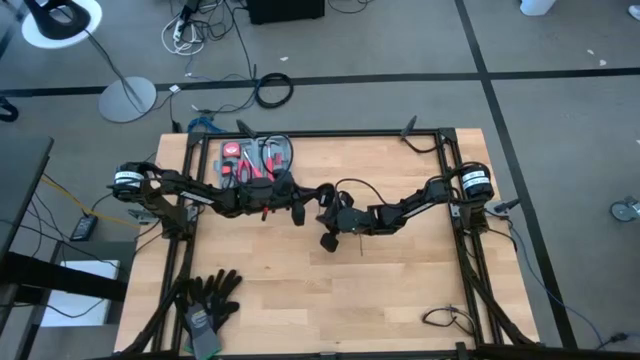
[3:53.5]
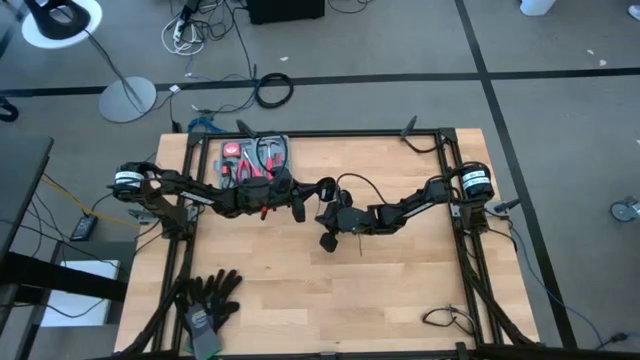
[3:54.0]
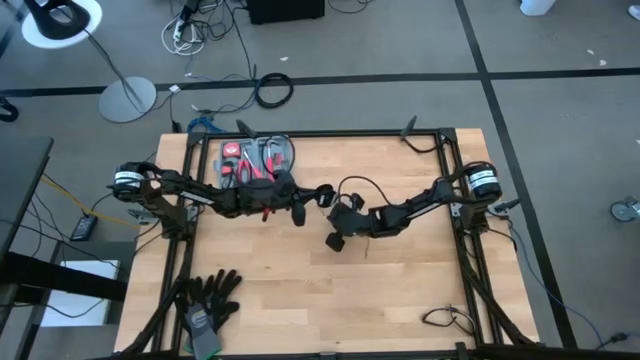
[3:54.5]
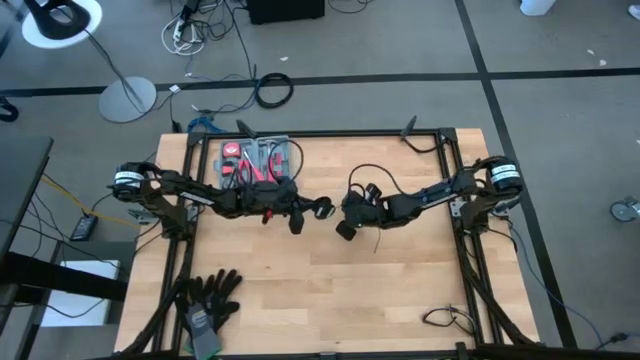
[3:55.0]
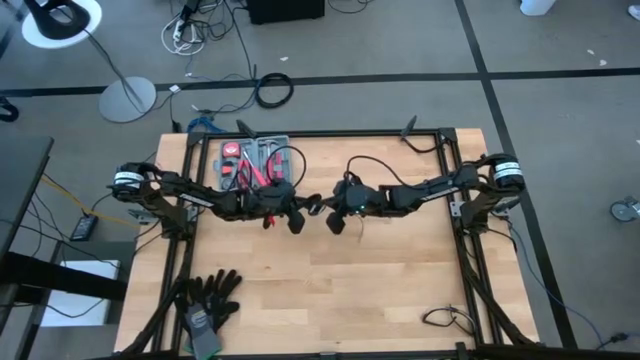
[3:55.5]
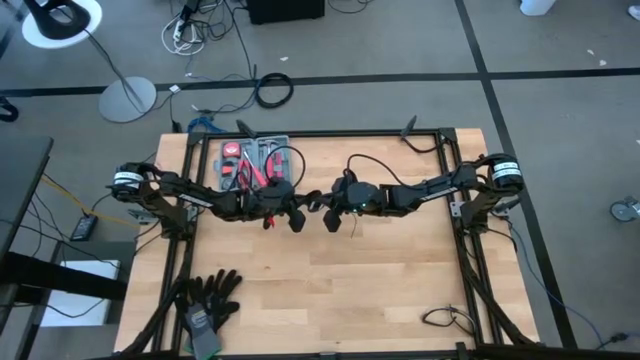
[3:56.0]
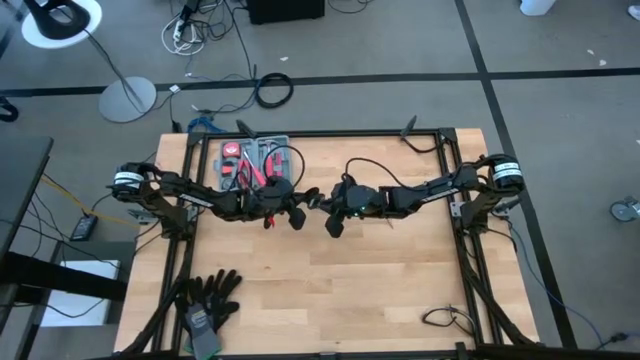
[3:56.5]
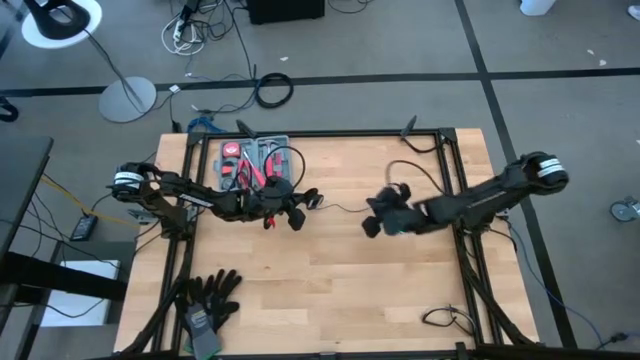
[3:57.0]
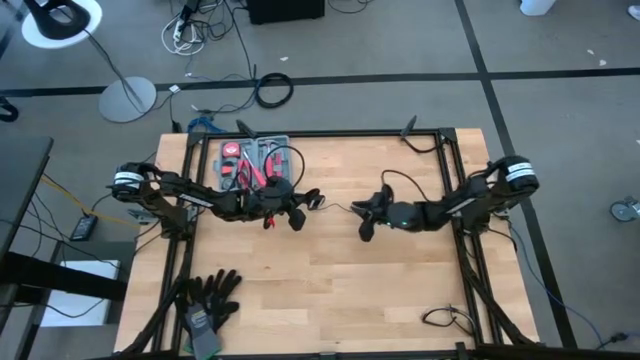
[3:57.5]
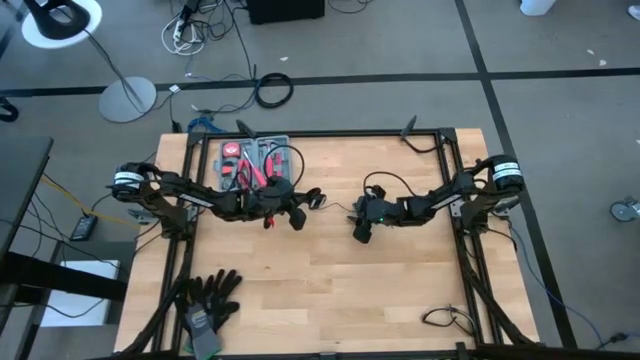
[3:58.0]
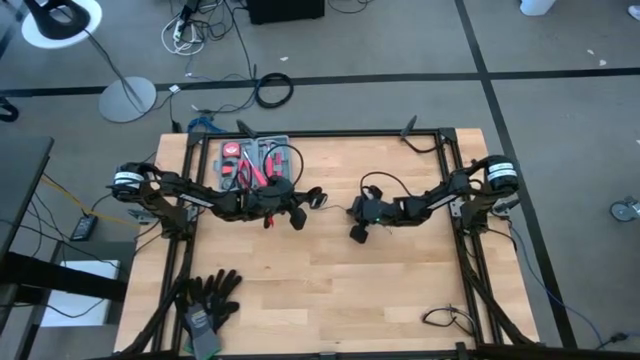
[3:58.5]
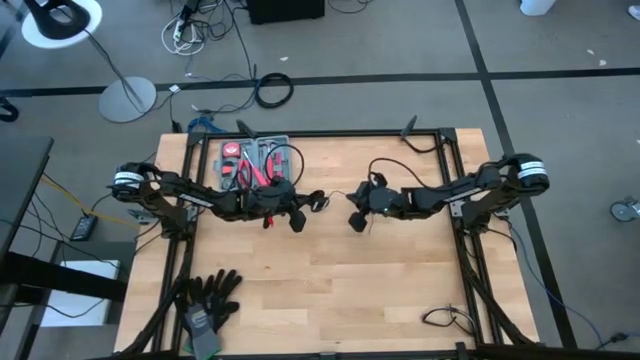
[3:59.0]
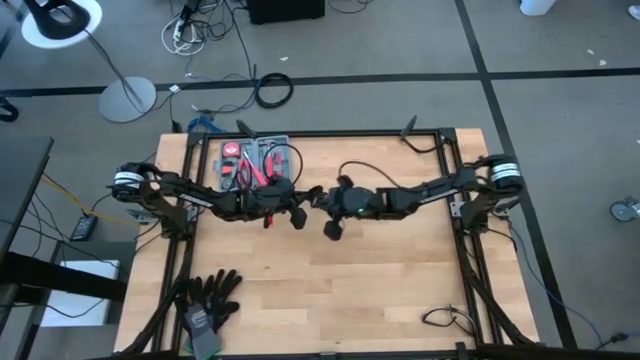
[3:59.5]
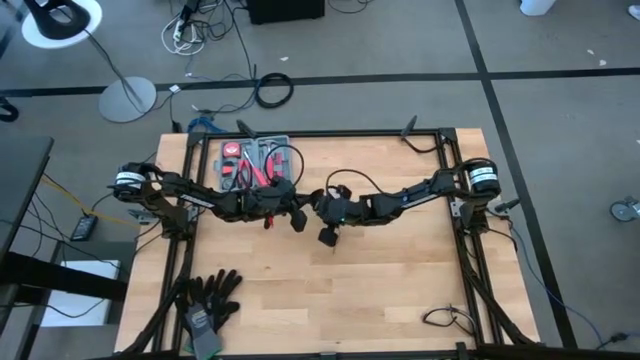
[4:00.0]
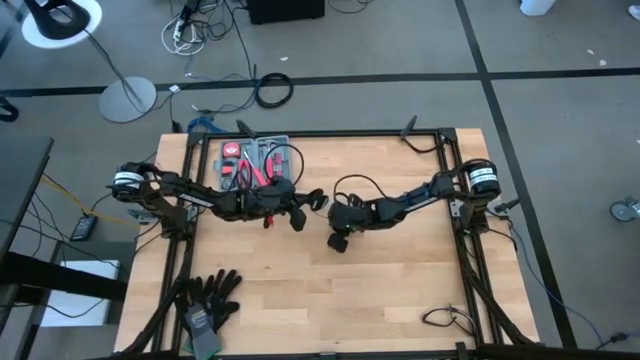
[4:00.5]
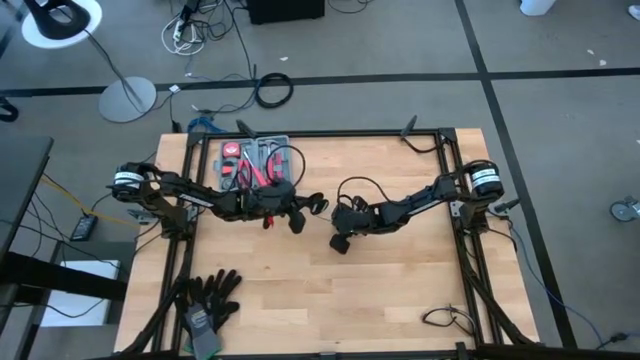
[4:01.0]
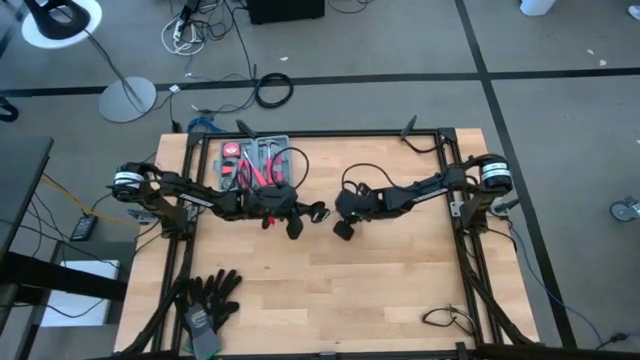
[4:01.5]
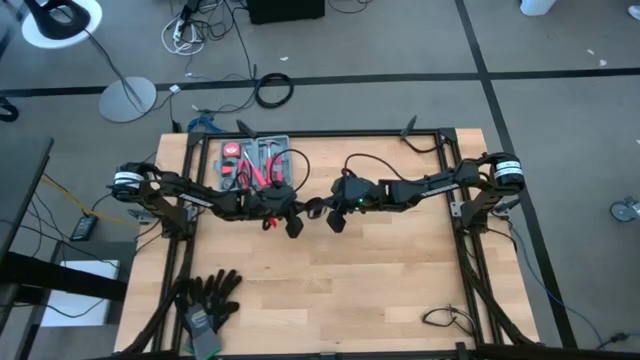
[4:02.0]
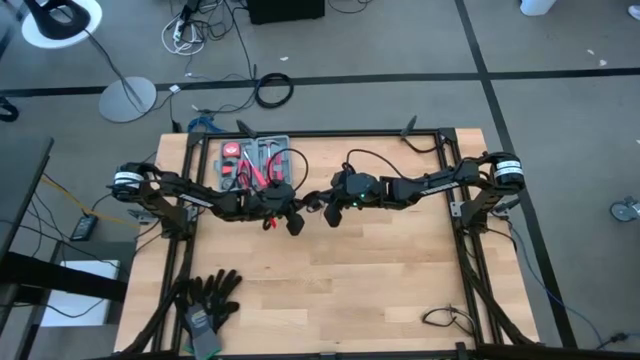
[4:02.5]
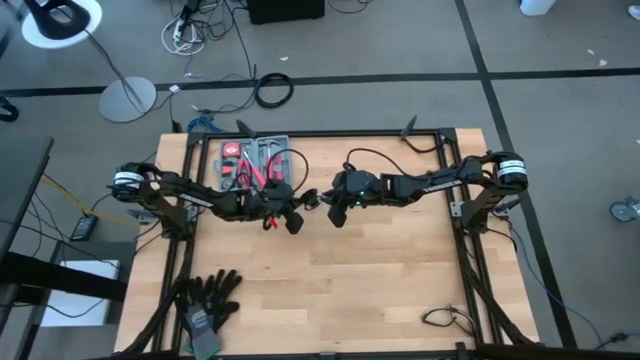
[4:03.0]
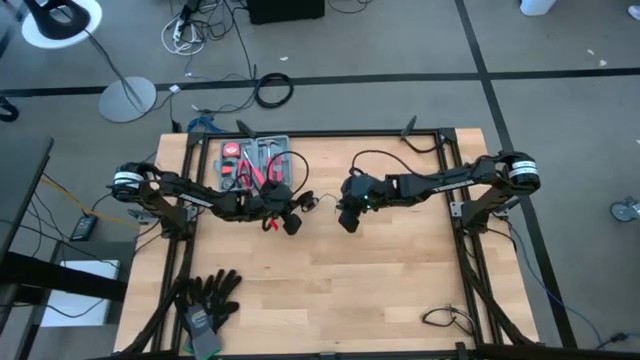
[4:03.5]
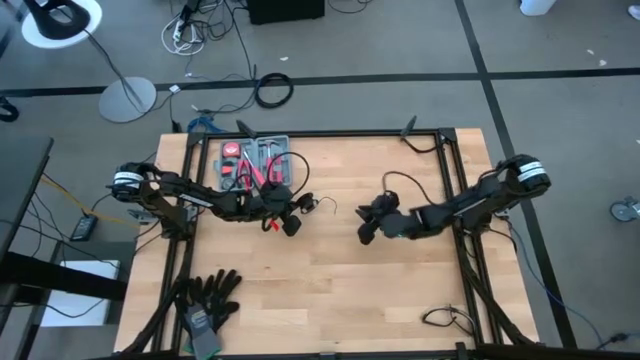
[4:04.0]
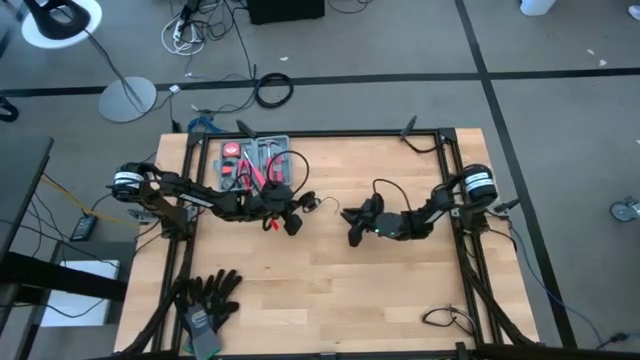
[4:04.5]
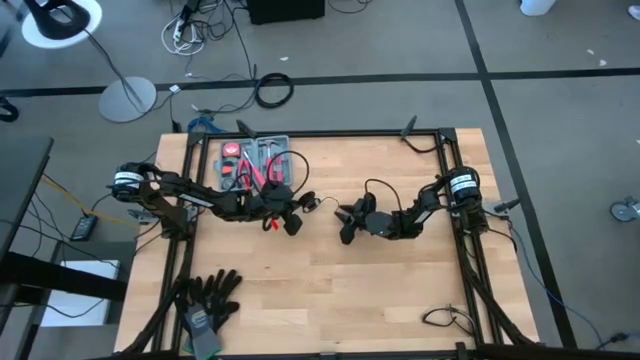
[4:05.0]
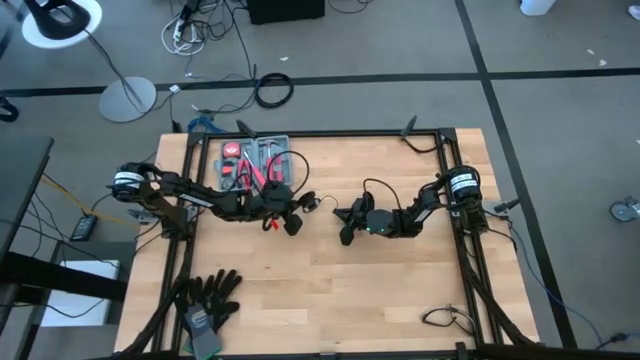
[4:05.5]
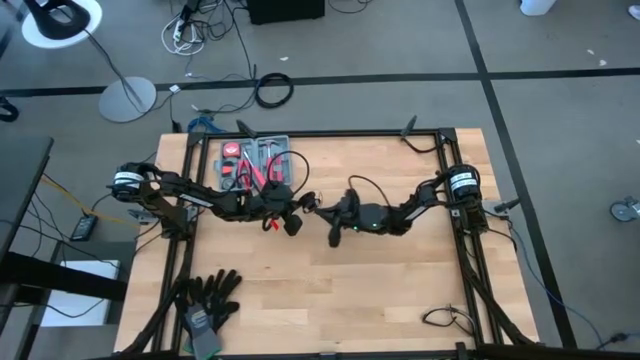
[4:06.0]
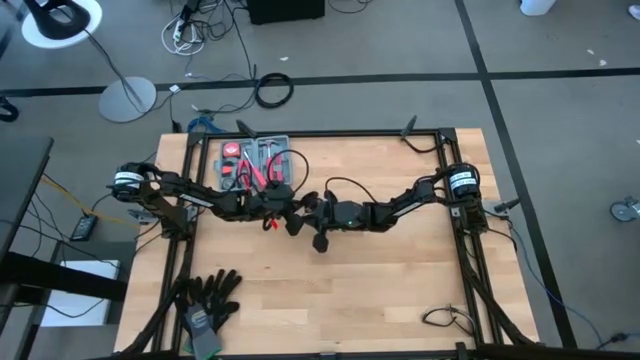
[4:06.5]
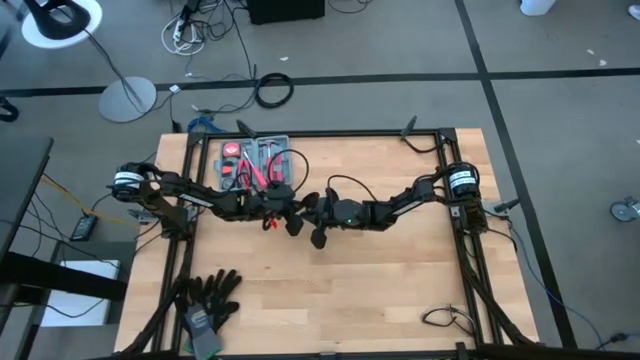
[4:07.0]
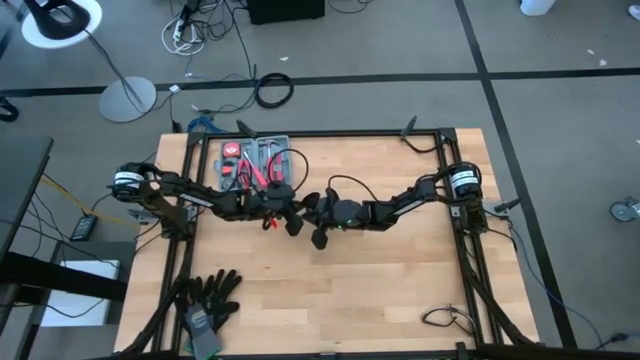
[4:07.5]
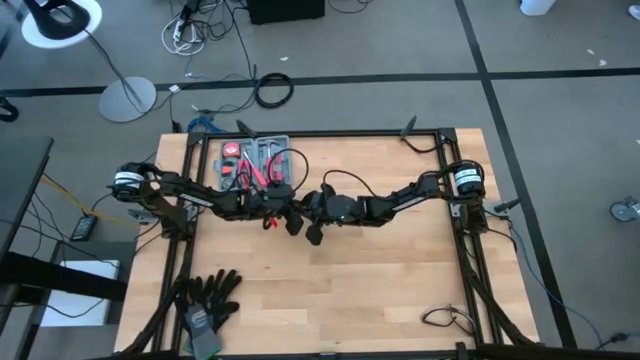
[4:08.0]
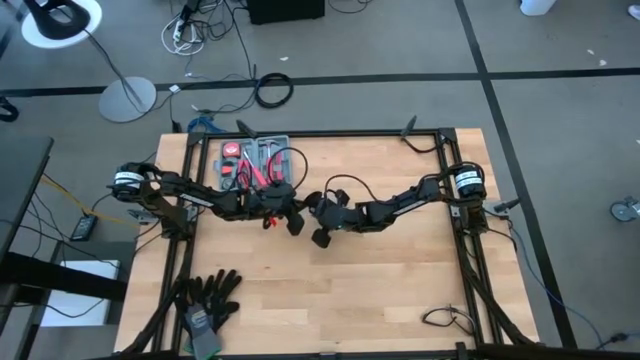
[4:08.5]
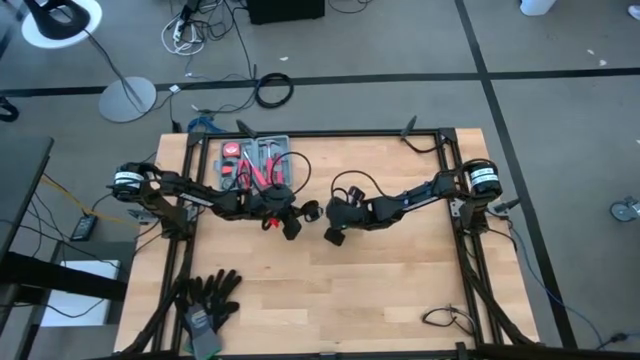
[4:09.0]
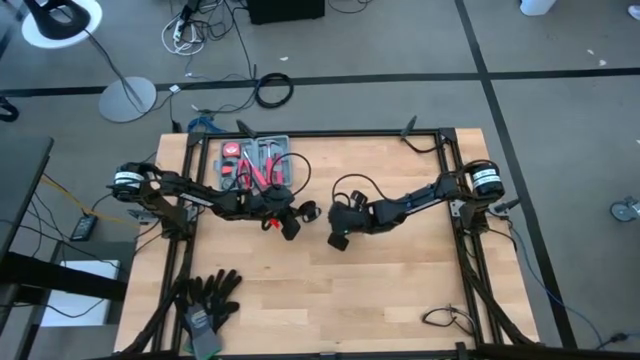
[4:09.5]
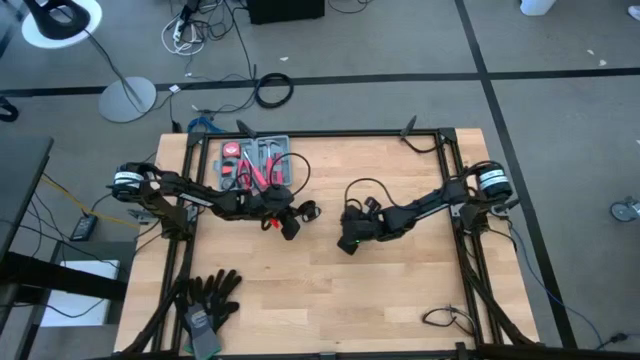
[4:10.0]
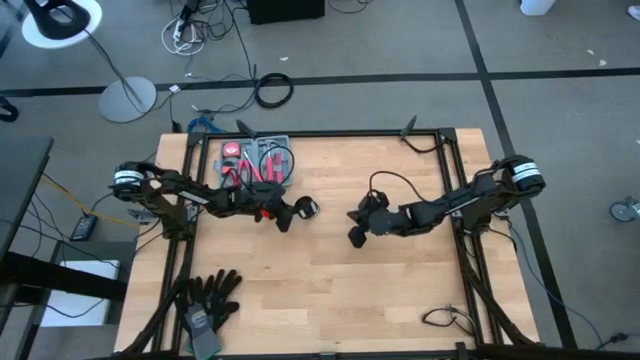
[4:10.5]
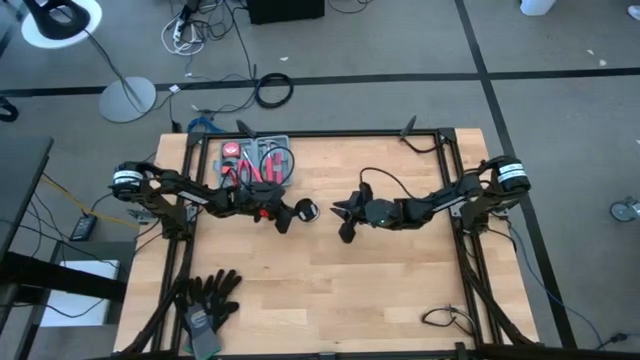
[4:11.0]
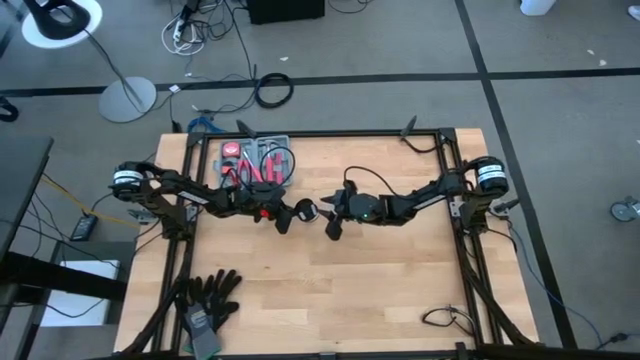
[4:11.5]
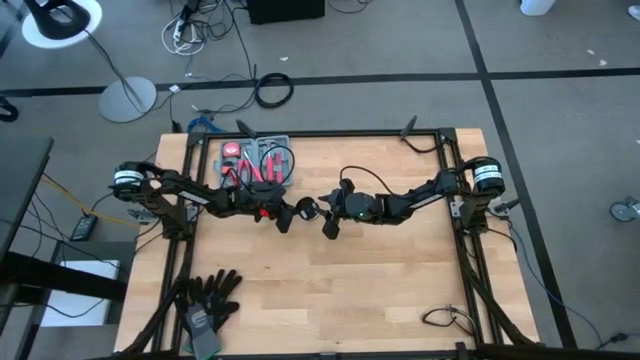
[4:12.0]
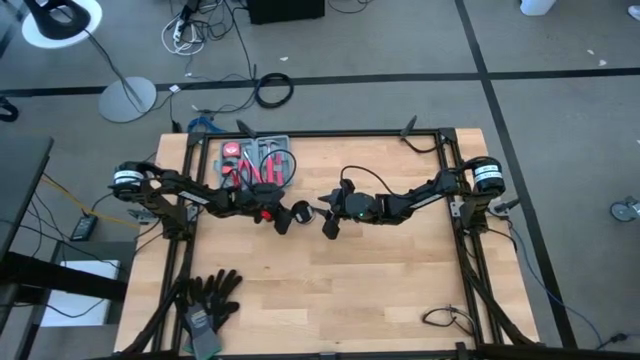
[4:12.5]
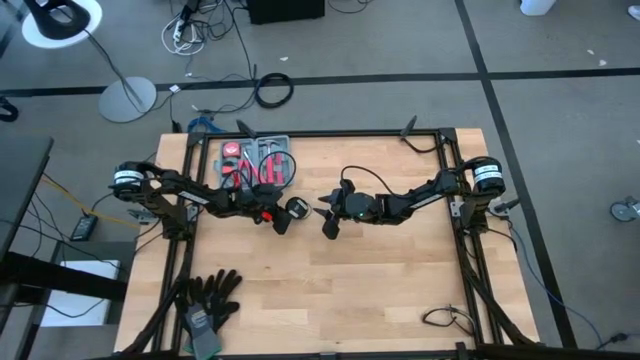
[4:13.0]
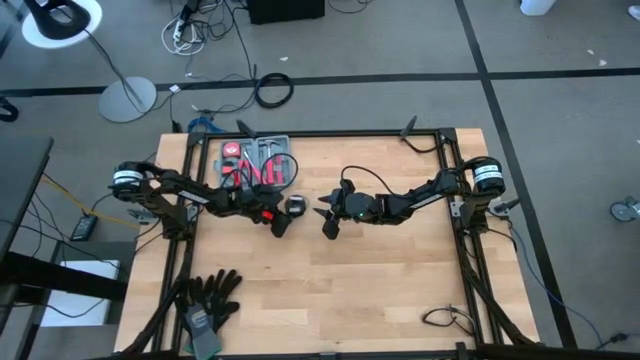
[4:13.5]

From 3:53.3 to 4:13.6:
Task: Coil cords
Coil the black cable wire on the spool
